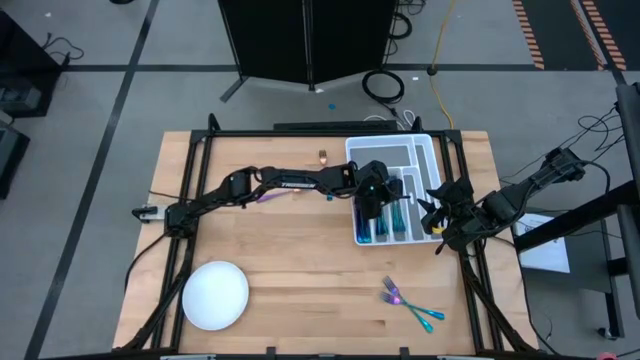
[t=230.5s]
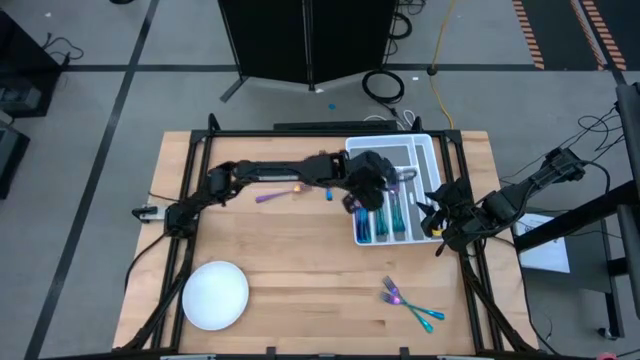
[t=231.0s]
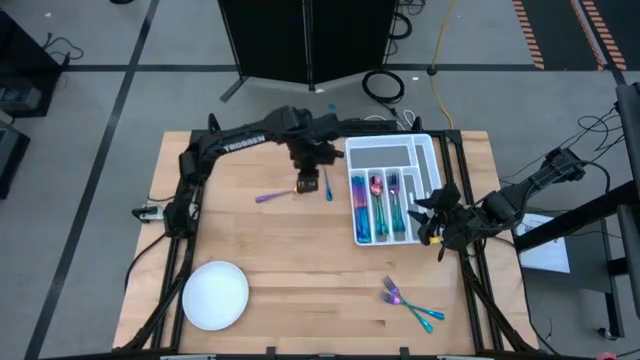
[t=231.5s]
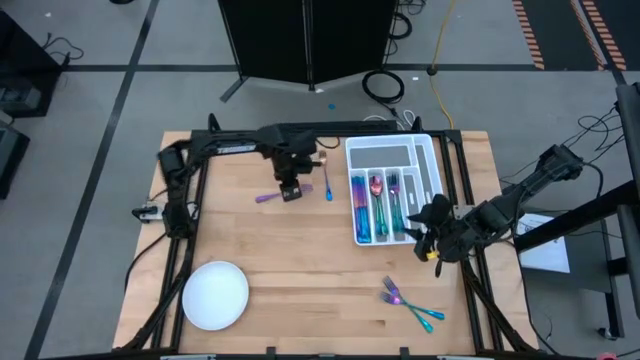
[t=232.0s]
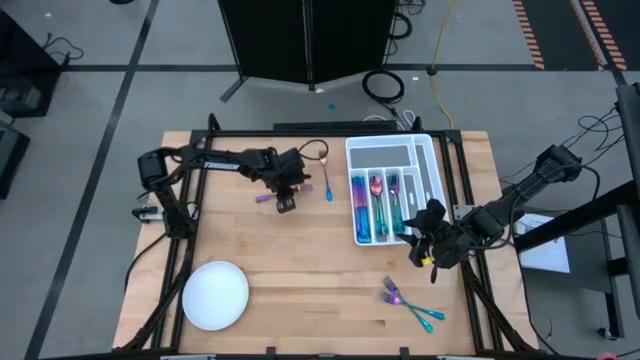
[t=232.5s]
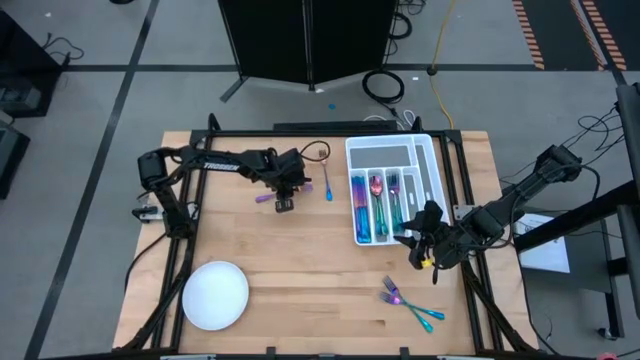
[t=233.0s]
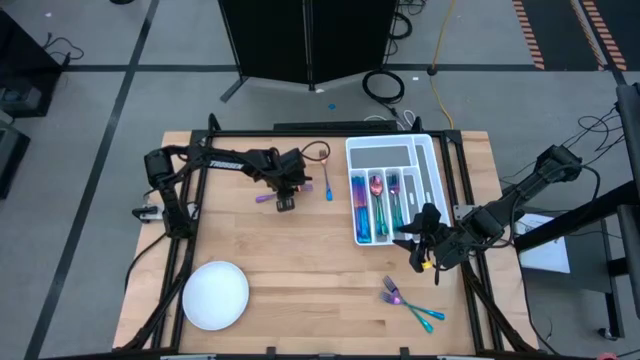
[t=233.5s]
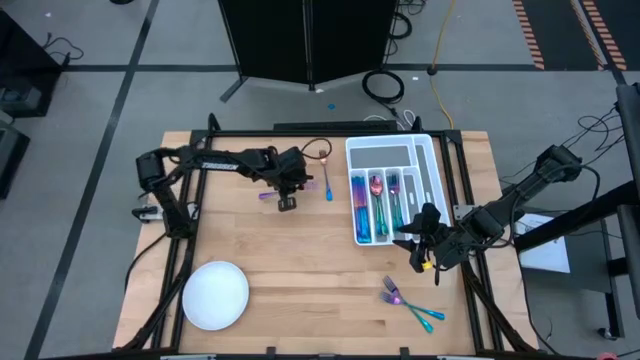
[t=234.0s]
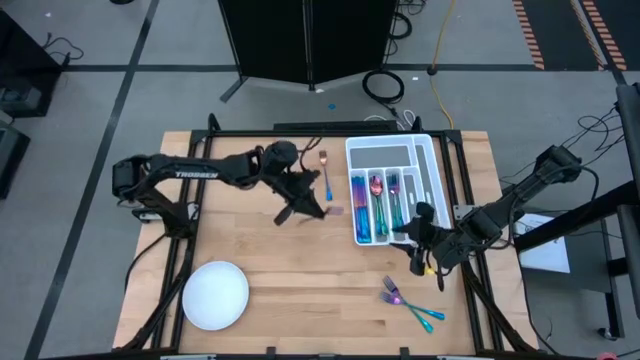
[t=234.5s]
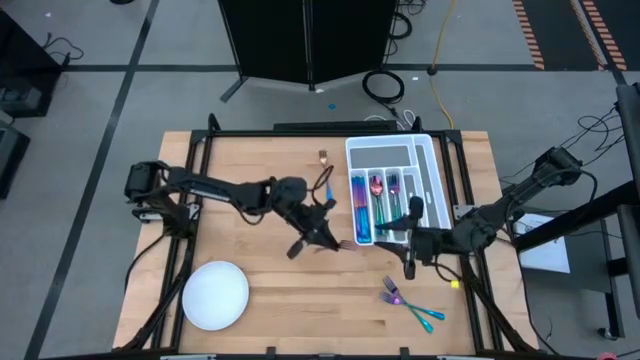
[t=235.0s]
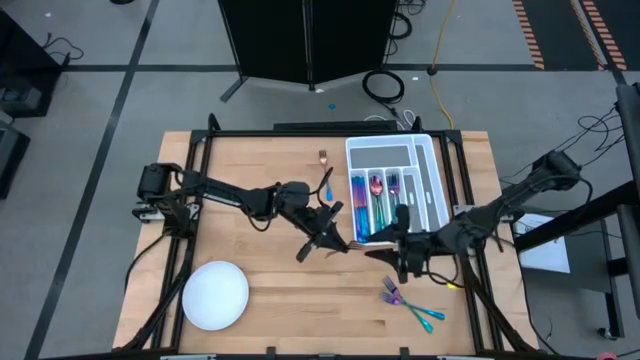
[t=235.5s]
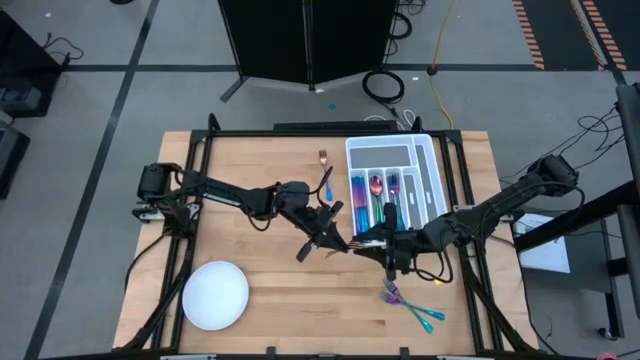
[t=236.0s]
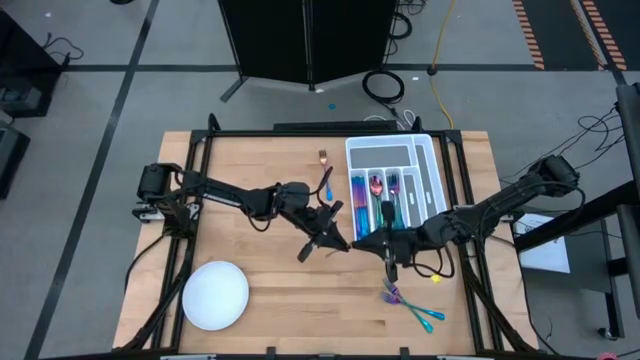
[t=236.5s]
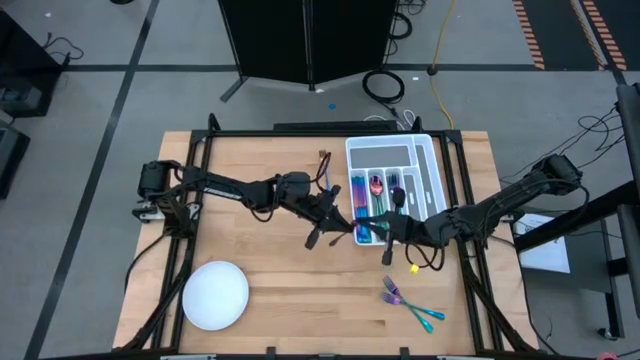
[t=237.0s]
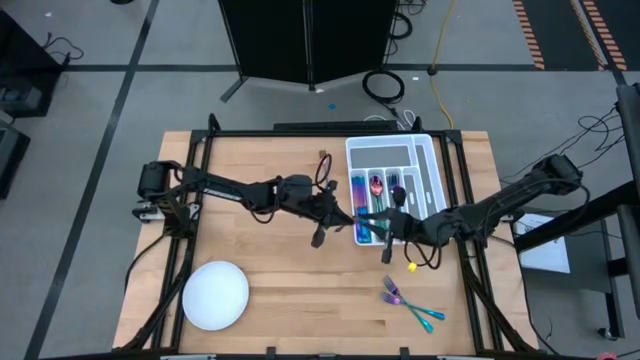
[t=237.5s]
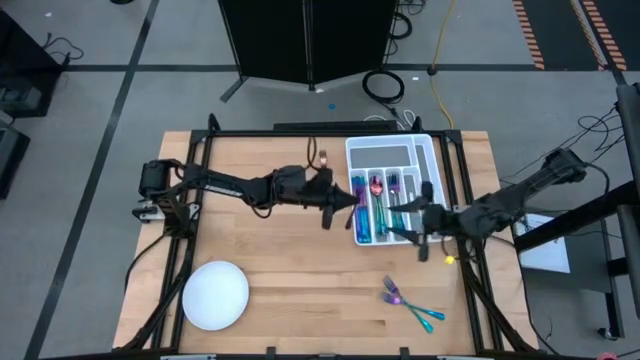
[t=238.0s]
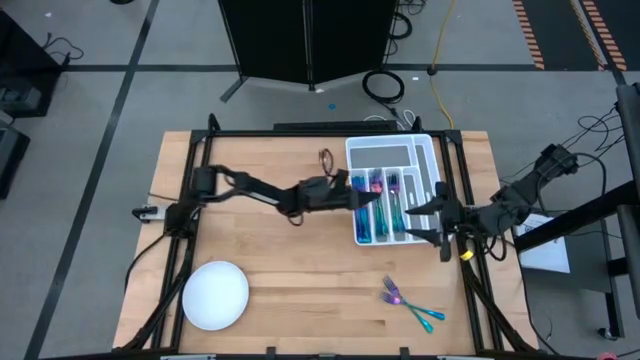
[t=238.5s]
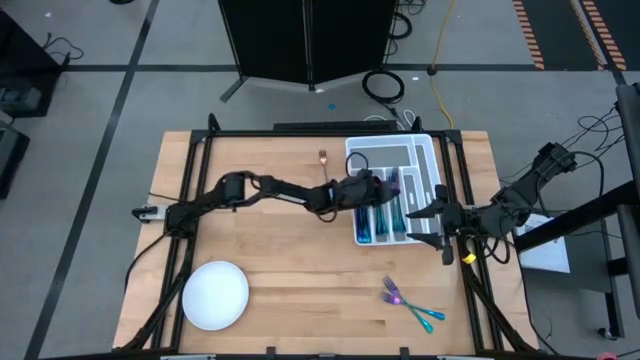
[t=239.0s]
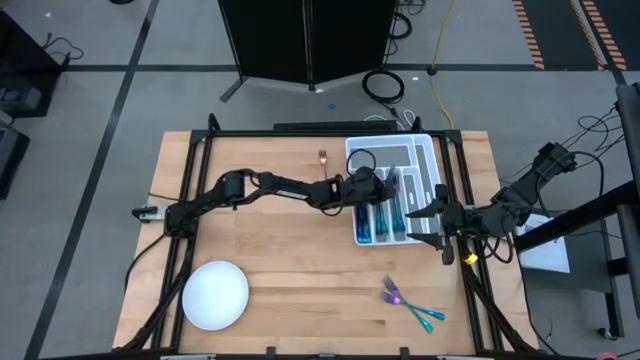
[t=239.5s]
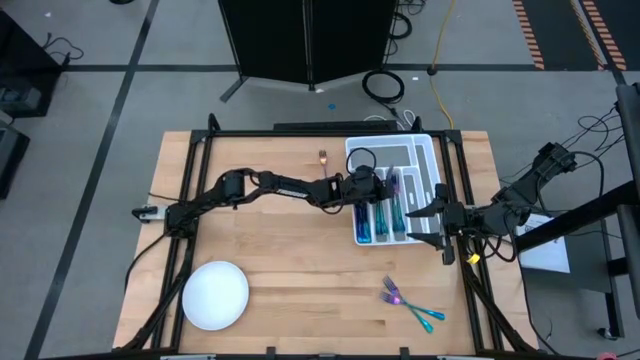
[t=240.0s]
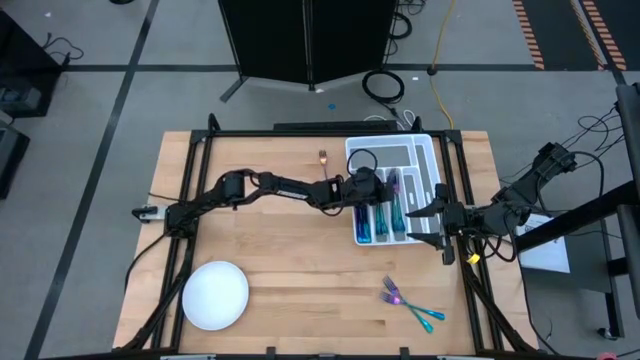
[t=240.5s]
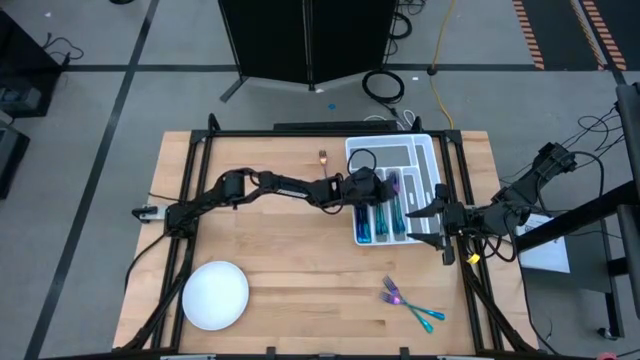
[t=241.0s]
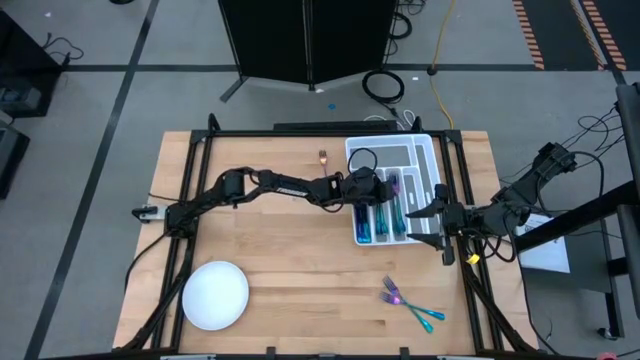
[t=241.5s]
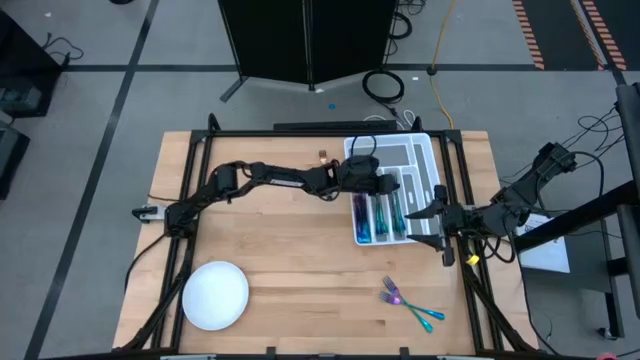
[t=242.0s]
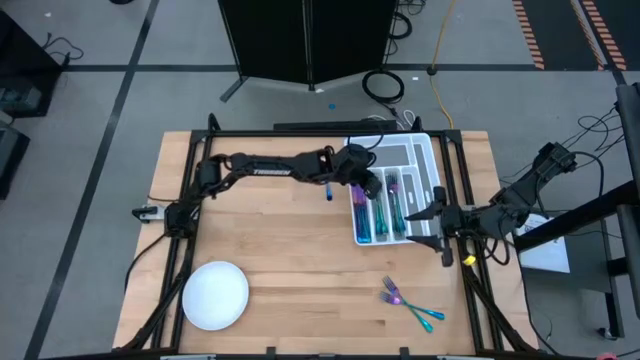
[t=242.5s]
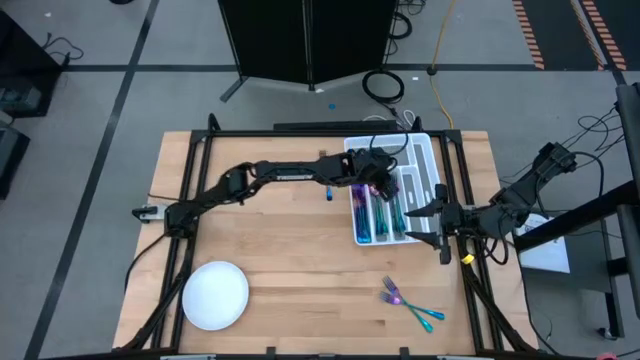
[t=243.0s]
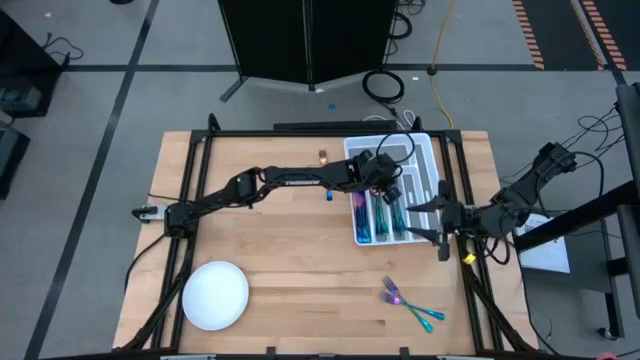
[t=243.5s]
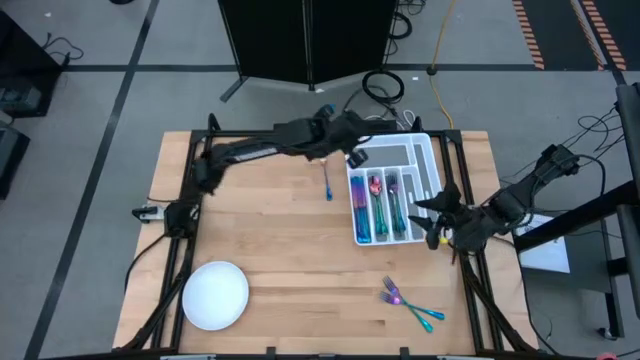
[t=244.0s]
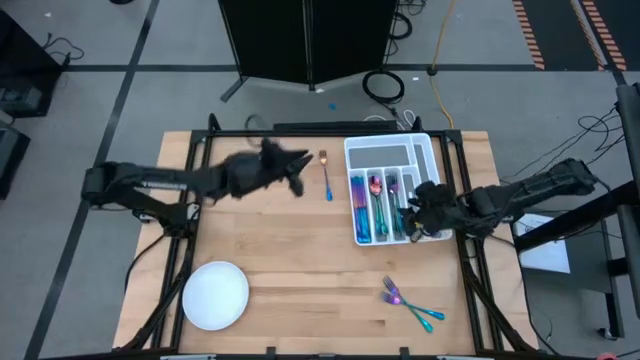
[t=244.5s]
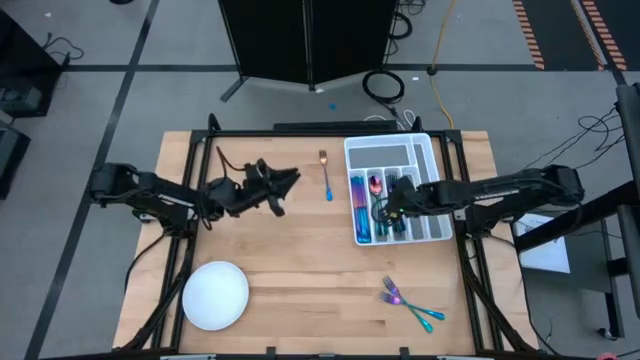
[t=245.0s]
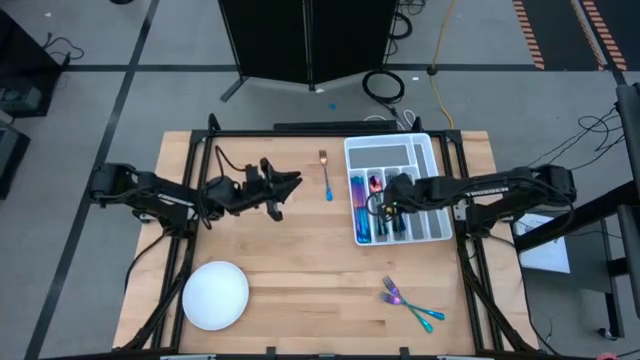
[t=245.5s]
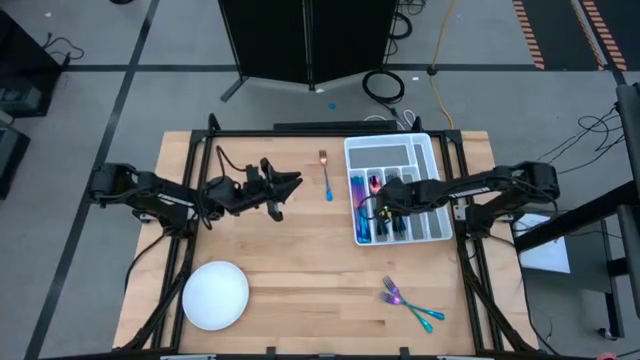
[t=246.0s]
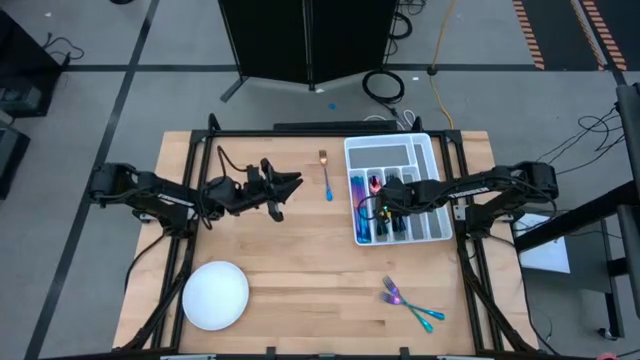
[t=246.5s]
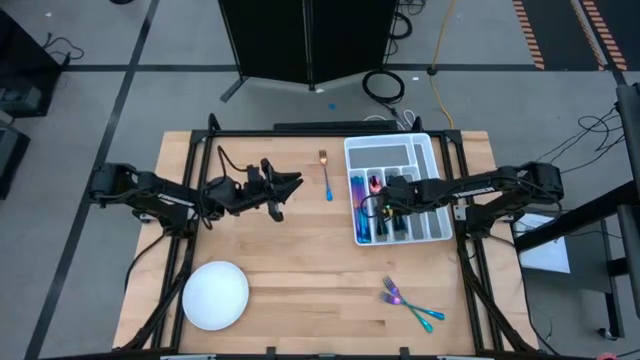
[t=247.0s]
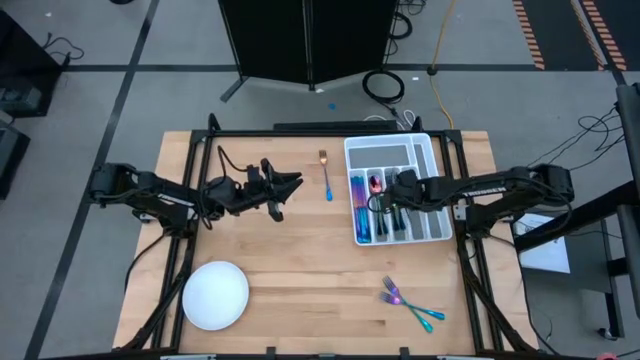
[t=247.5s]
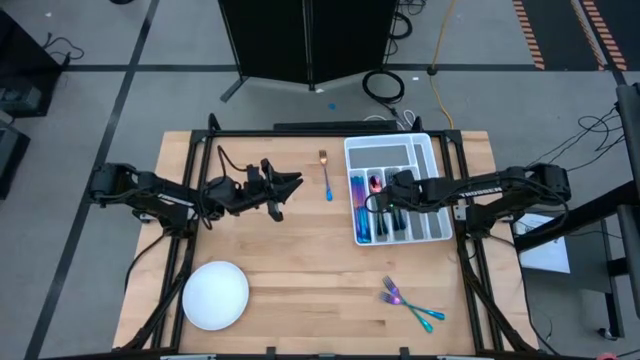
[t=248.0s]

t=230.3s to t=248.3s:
Task: Sort silverware
Put the blue fork into the utensil organizer

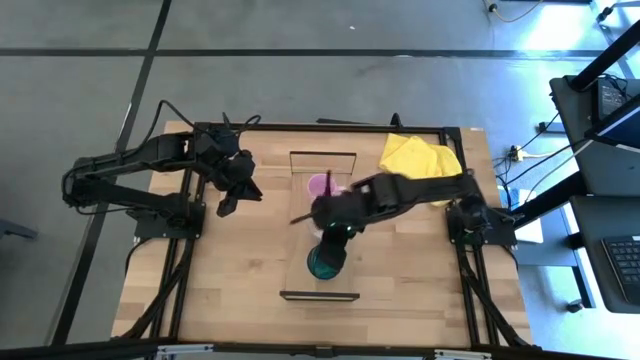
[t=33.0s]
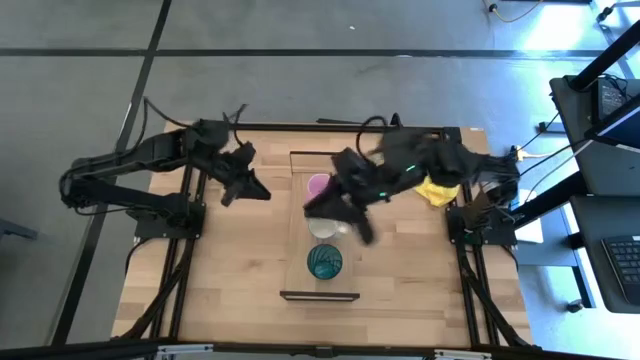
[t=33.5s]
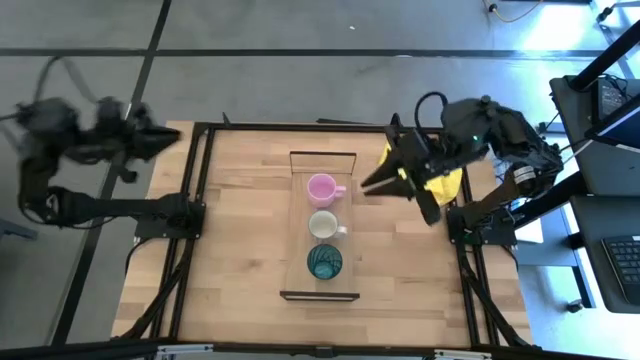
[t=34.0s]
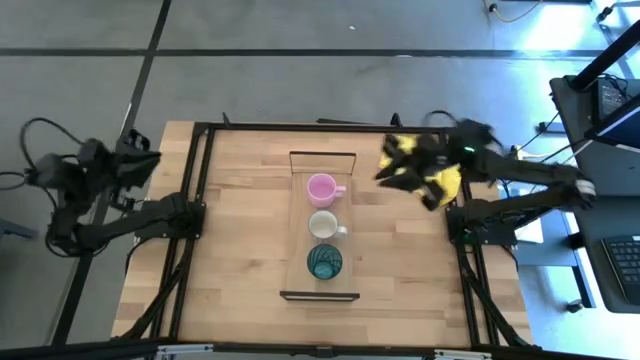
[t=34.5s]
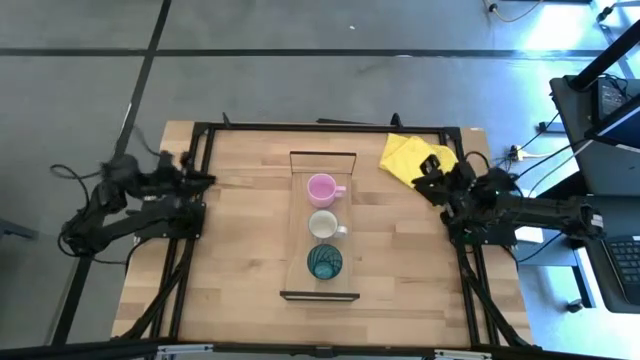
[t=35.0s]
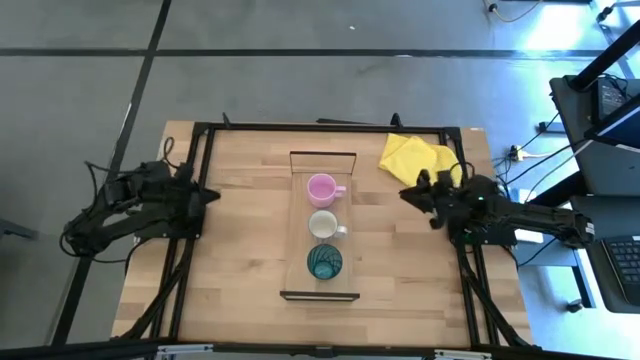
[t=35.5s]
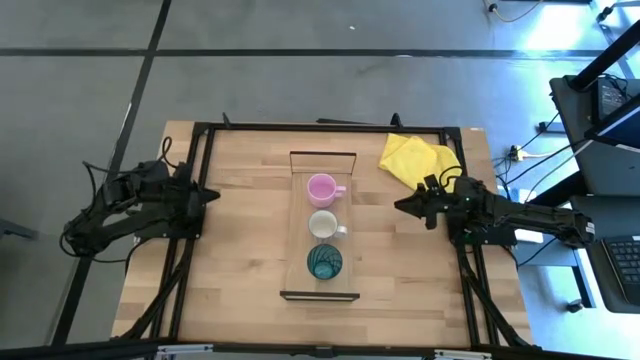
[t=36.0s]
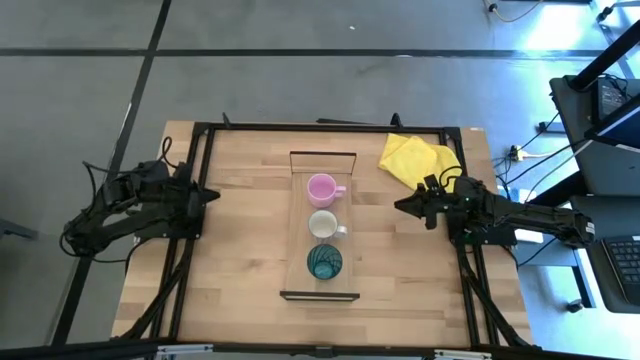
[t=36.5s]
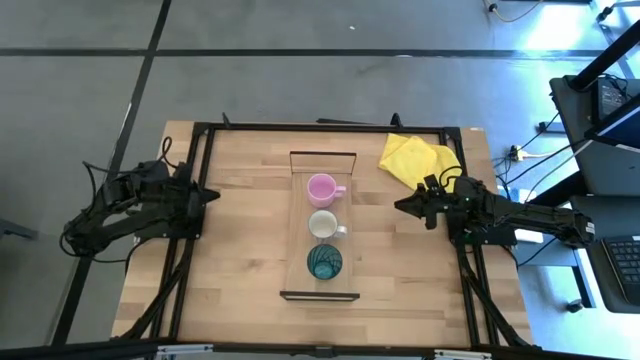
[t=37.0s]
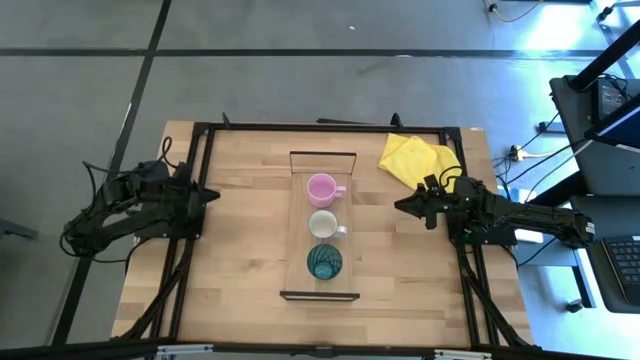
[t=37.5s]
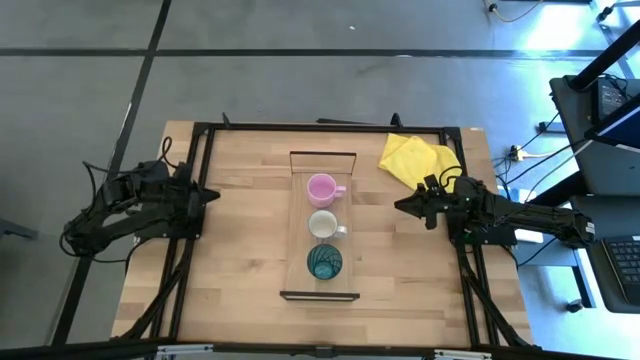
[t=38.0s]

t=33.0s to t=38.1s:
Task: Stack small to large cups/mugs on shelf
Return to Home Position
